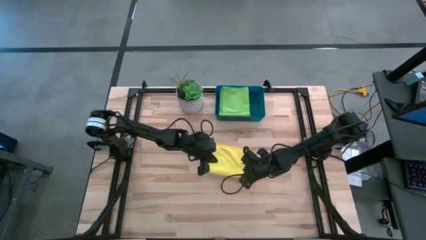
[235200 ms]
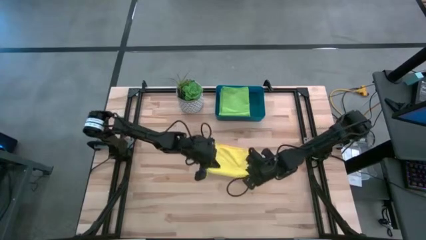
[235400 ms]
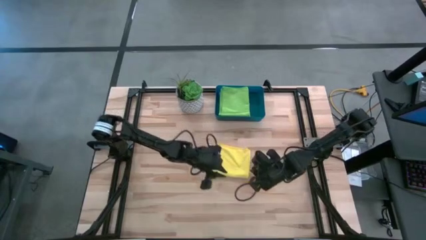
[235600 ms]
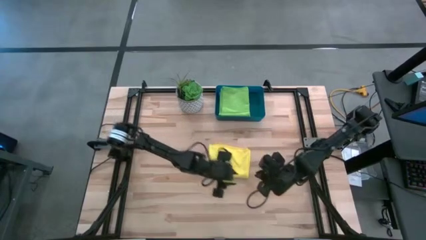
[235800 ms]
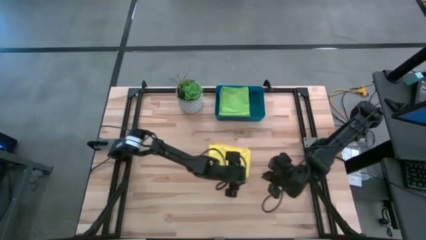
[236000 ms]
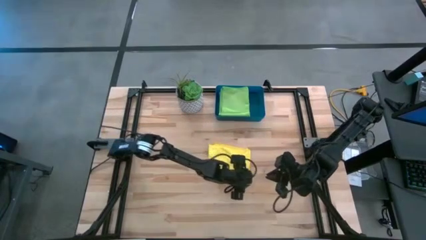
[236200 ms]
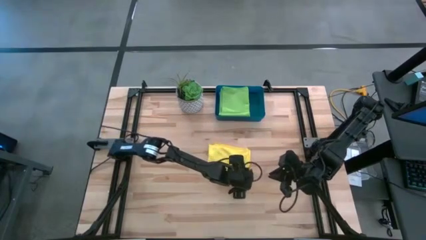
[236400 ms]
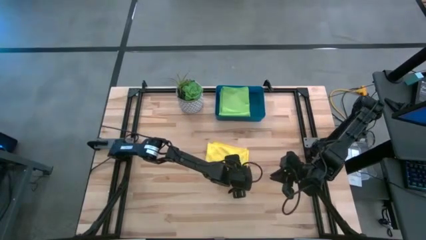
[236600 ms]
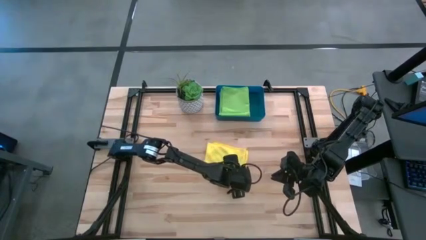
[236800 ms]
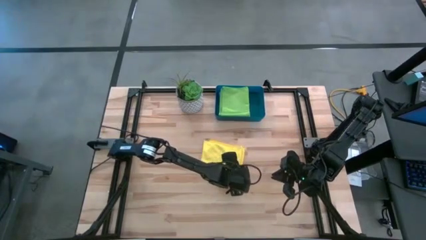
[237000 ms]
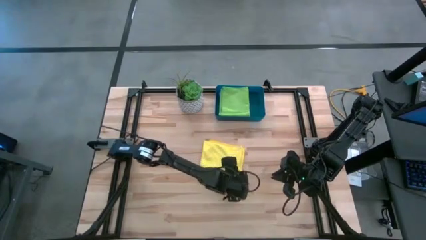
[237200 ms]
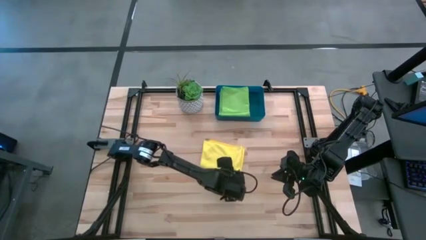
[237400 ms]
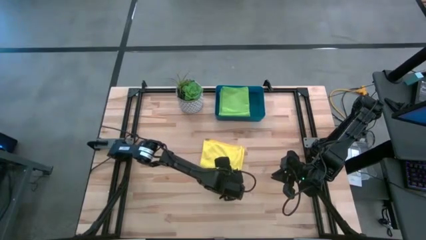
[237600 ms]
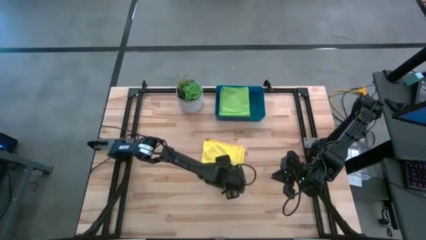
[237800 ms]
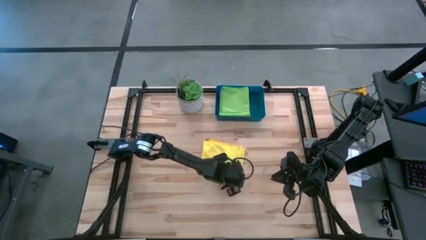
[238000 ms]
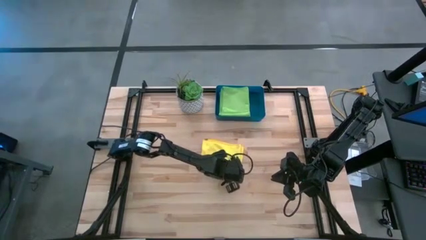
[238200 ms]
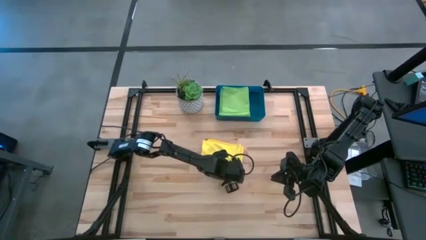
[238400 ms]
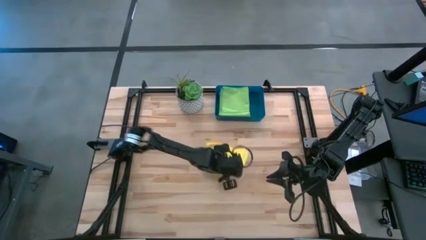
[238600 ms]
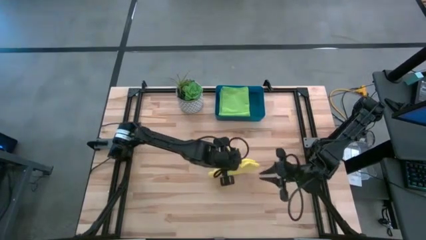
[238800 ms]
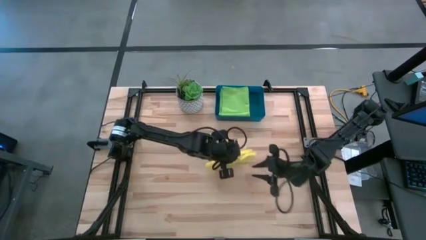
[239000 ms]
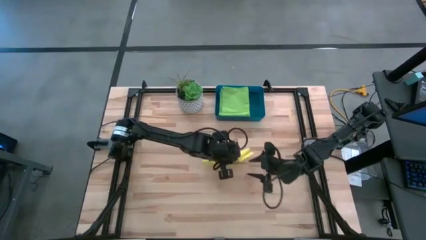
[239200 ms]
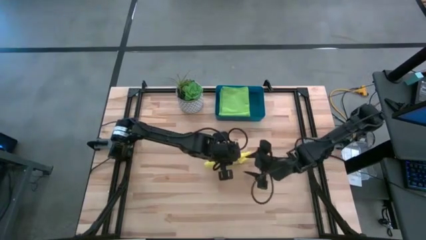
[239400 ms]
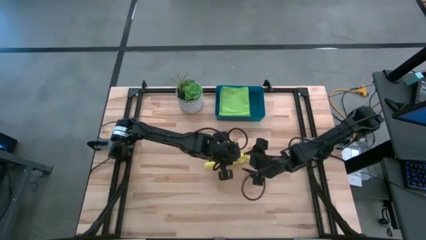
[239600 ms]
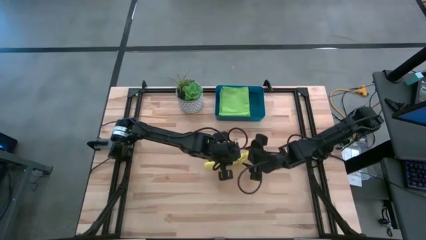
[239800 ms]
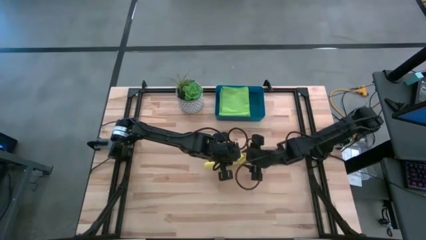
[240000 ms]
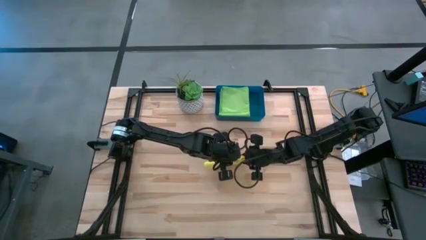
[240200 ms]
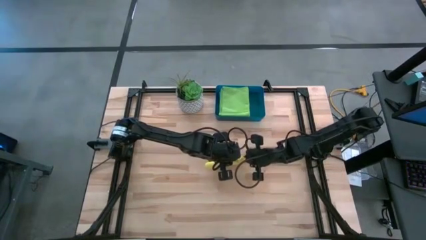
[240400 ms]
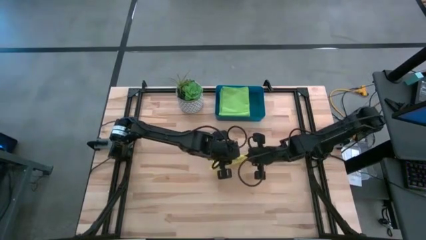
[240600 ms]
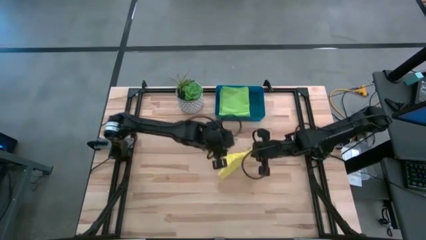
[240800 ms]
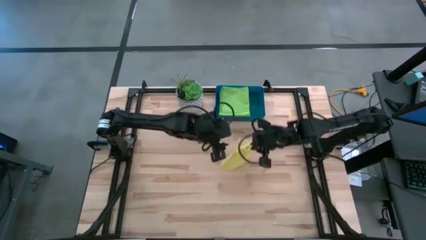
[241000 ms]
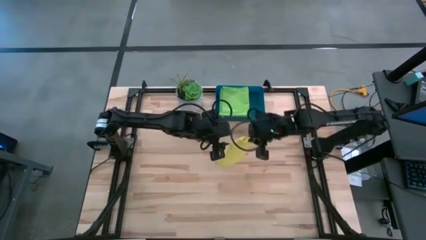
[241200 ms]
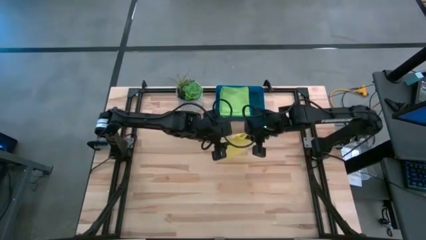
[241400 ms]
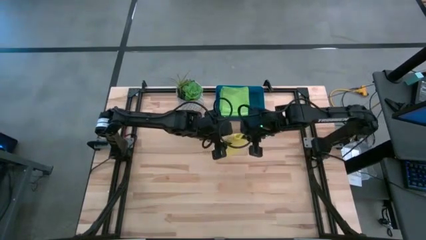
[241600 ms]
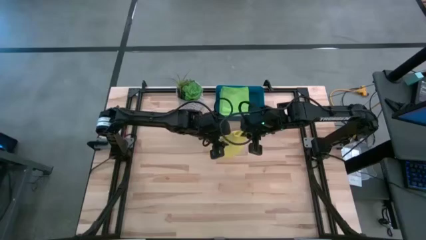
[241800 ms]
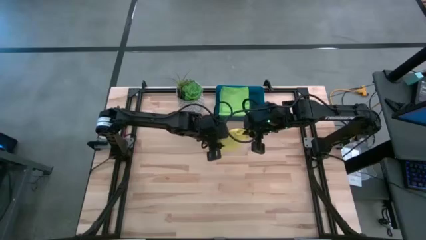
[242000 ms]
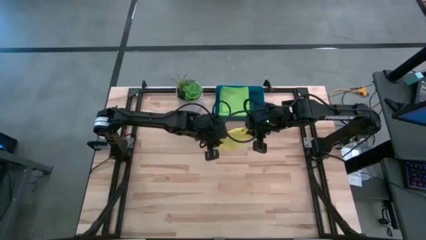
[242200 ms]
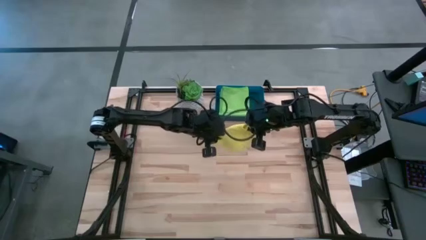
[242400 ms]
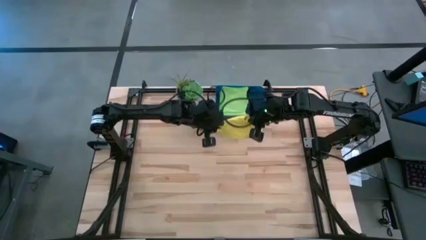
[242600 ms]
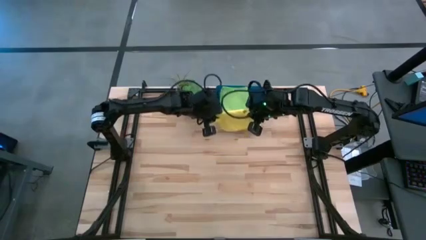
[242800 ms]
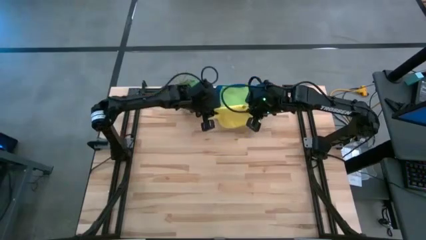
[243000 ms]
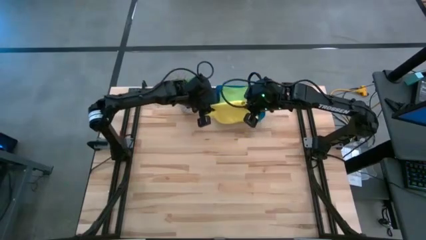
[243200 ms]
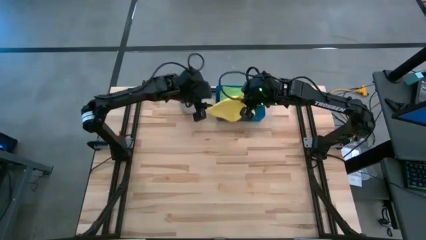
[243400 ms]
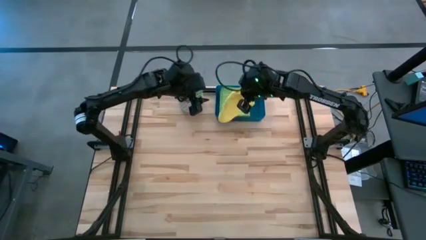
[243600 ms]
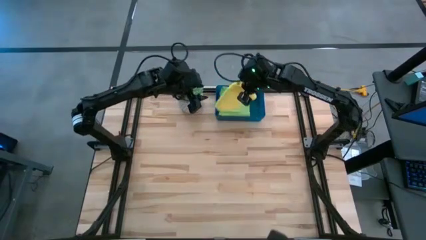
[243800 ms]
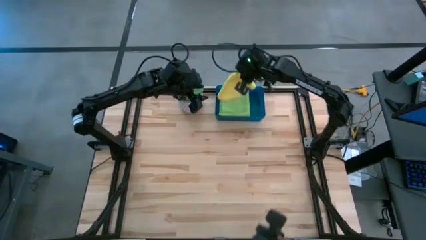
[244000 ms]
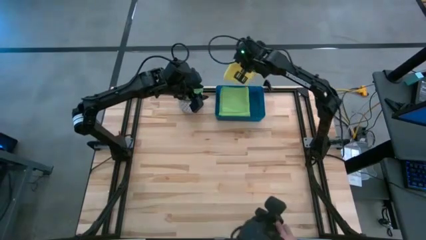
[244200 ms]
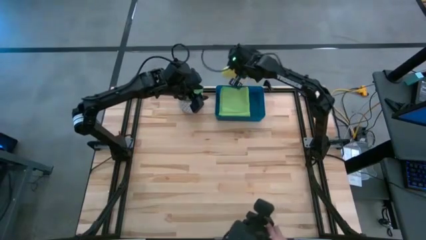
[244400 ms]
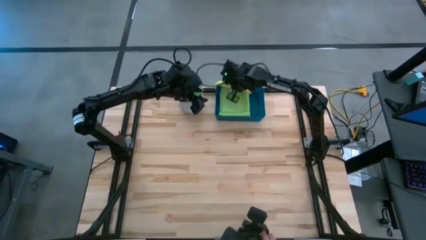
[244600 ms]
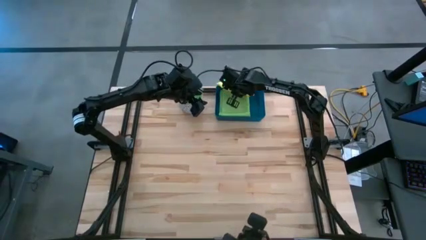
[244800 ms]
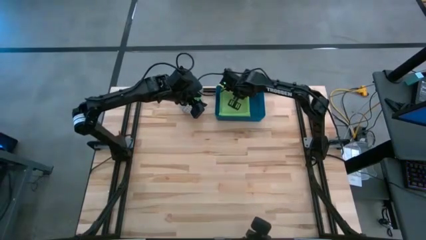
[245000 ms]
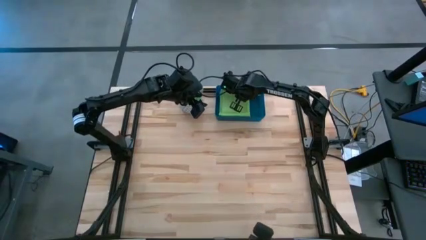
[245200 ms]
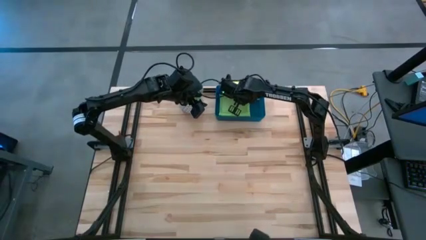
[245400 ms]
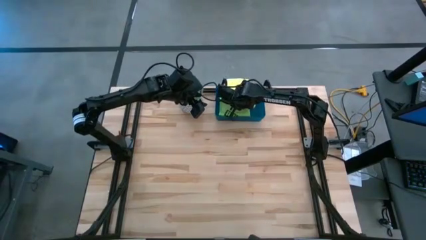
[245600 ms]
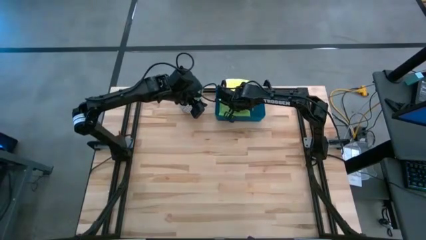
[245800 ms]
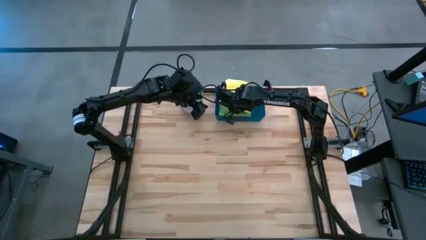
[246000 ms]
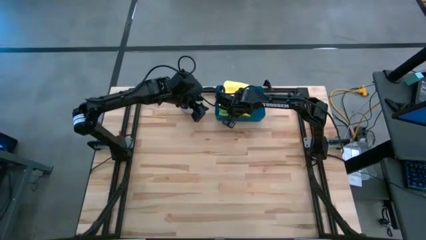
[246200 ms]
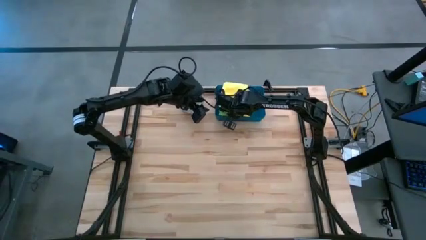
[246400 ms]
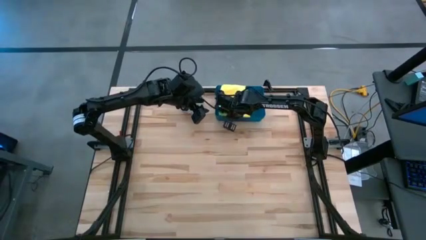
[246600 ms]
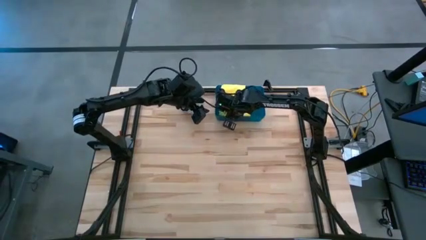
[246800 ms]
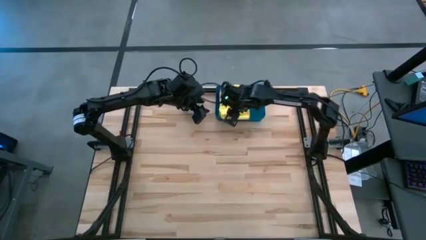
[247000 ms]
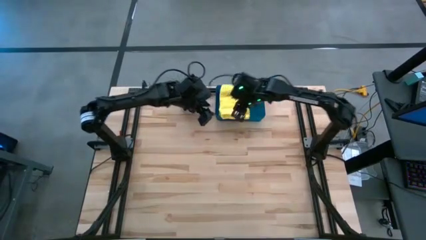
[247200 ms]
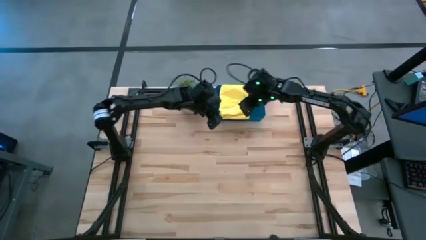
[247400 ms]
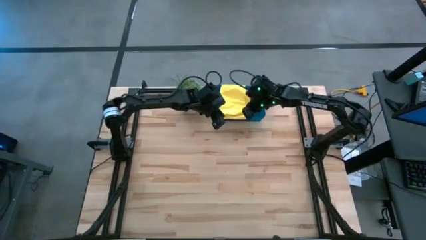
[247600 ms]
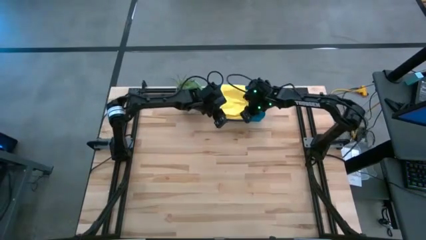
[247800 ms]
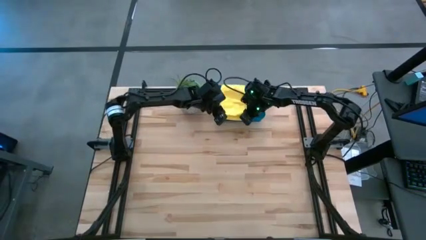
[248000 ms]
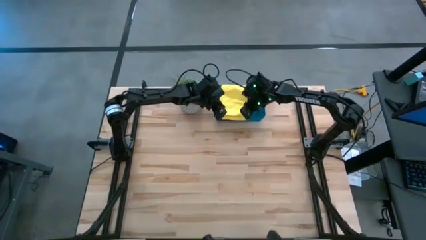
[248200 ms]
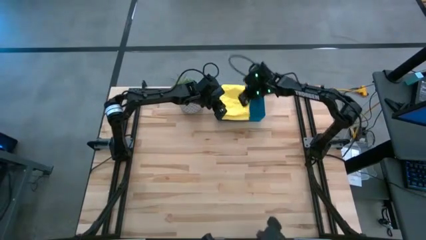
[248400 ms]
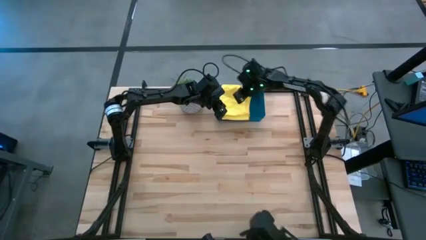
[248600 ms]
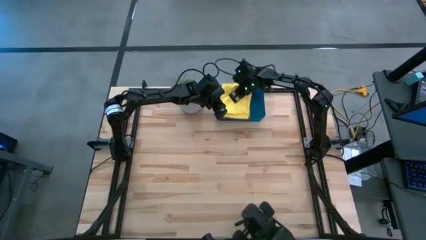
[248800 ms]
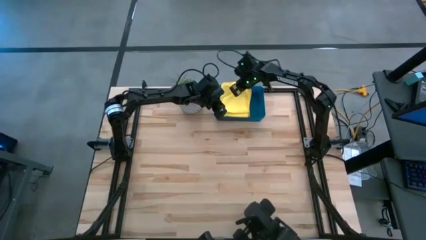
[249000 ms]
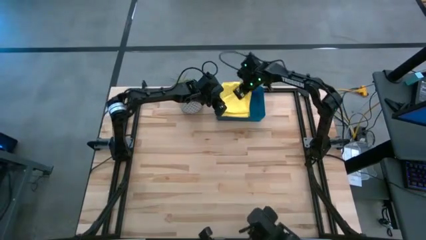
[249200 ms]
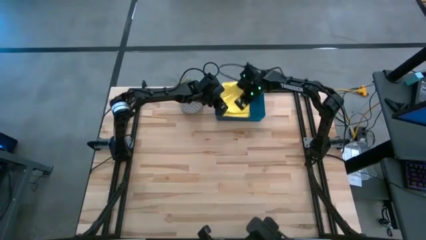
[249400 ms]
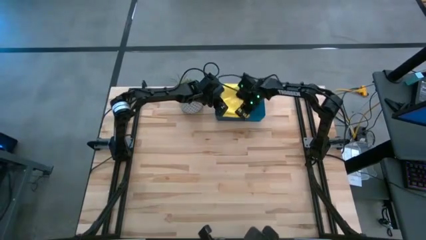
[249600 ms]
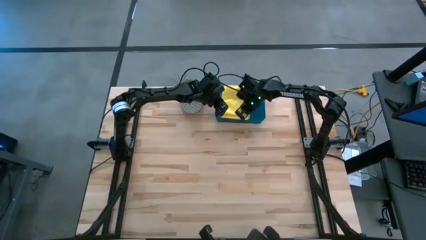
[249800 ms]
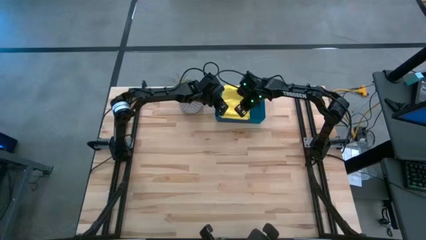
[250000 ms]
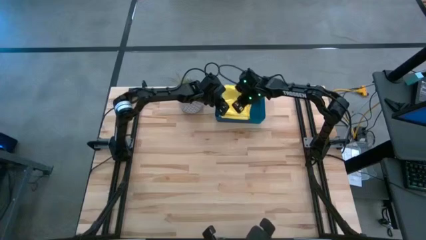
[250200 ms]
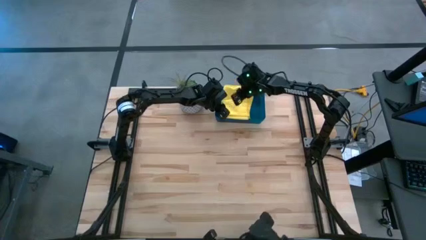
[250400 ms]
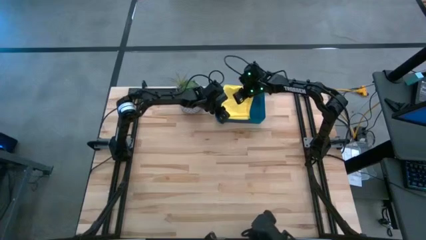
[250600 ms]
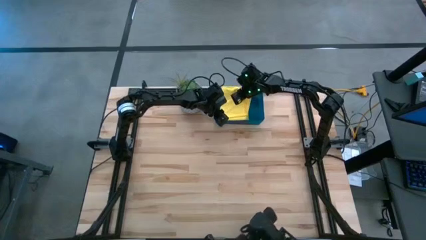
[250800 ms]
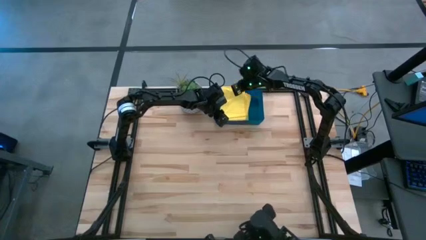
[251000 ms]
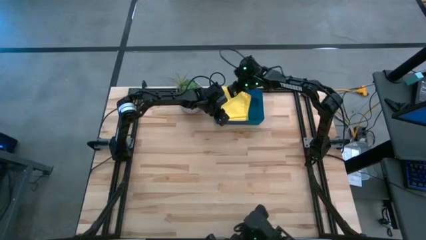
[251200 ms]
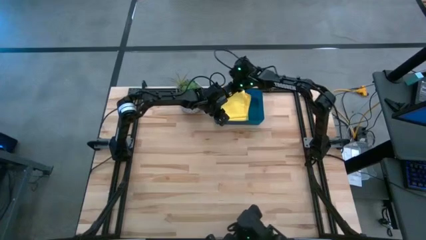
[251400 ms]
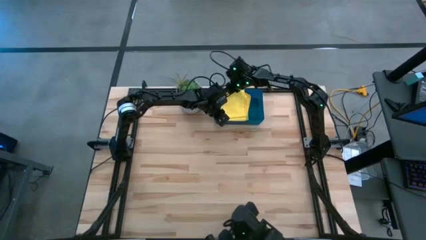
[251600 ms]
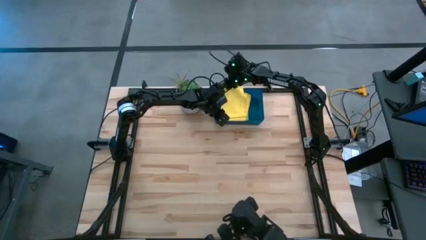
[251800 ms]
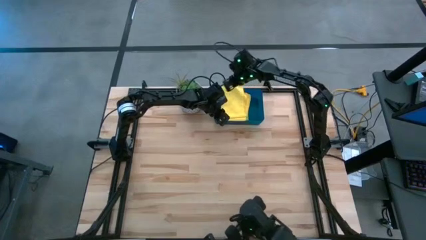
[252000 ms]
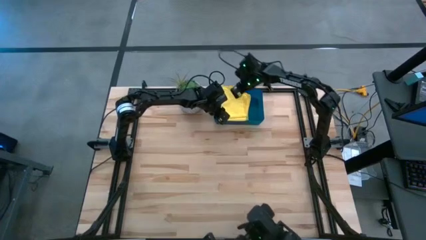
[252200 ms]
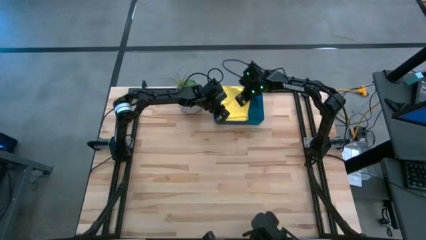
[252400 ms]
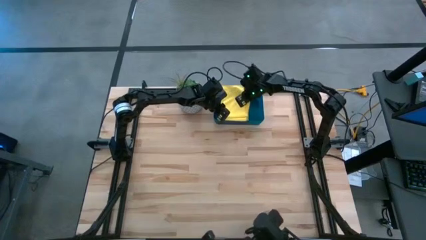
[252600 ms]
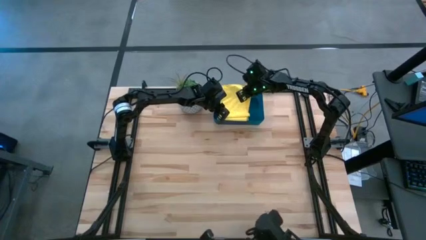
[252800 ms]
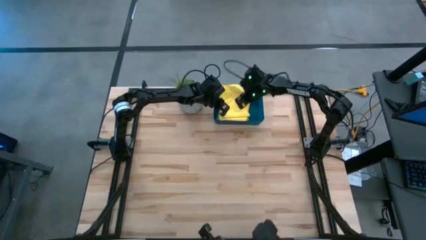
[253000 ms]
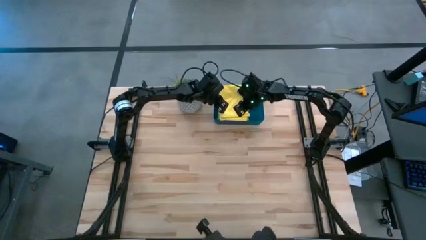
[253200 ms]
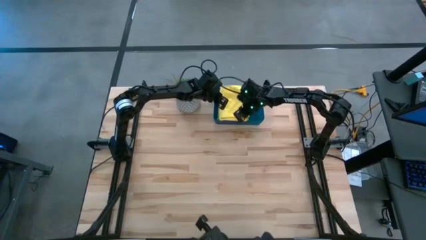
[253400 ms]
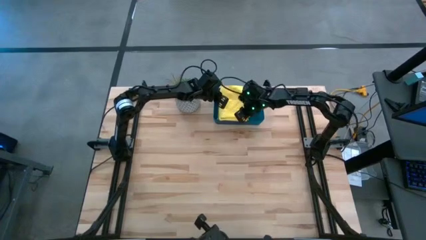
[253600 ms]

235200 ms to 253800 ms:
Task: Fold microfiber towels
Fold the yellow microfiber towel on top of the green microfiber towel into the dark blue bin
